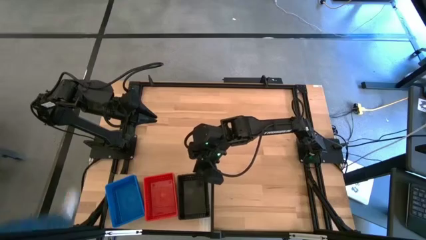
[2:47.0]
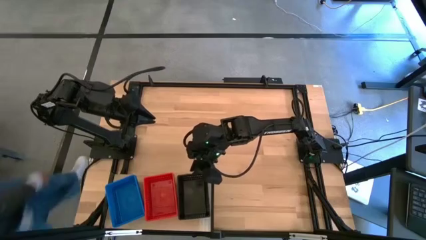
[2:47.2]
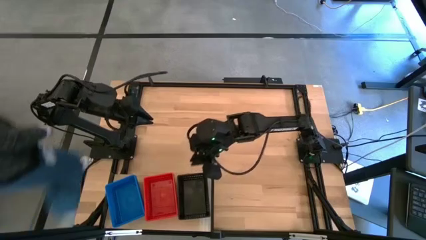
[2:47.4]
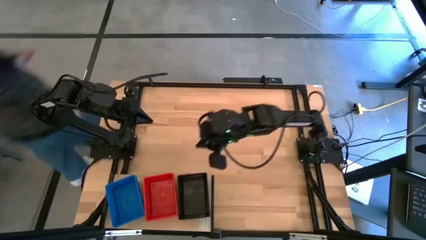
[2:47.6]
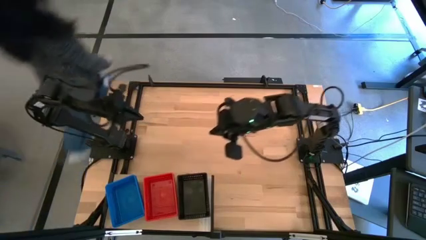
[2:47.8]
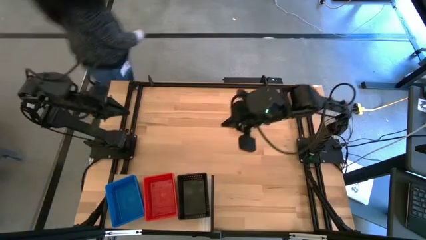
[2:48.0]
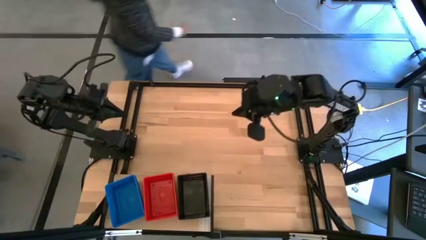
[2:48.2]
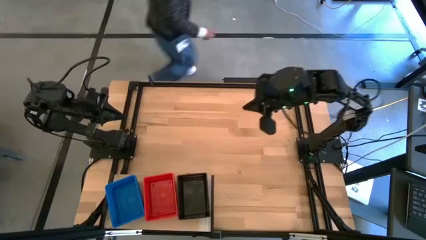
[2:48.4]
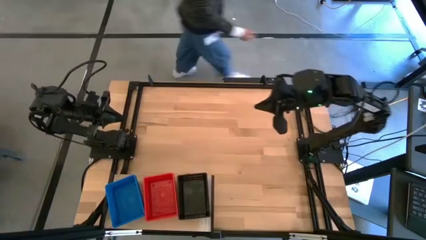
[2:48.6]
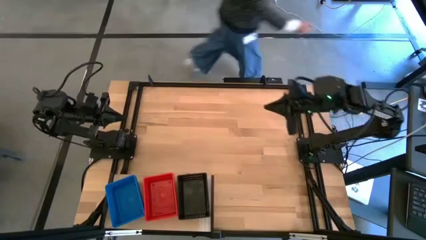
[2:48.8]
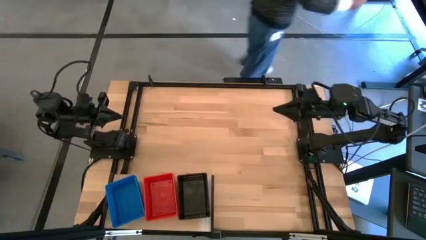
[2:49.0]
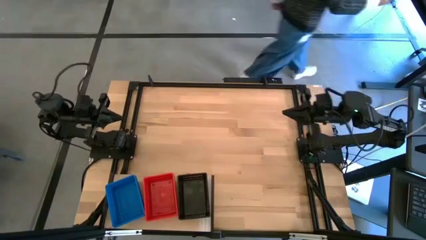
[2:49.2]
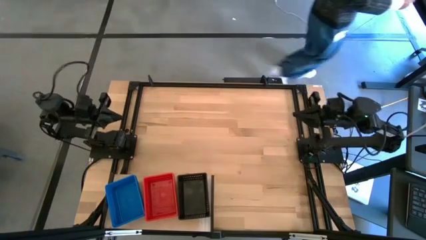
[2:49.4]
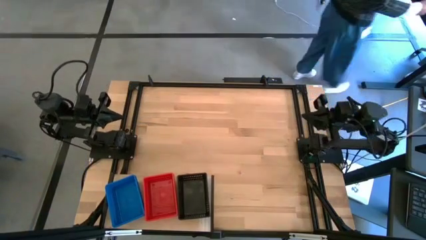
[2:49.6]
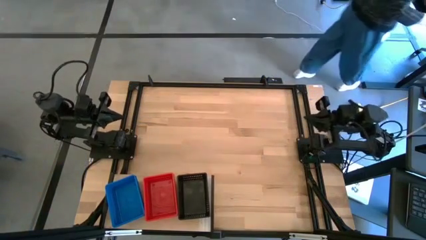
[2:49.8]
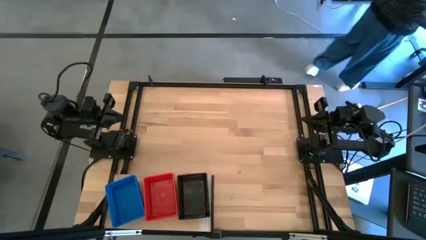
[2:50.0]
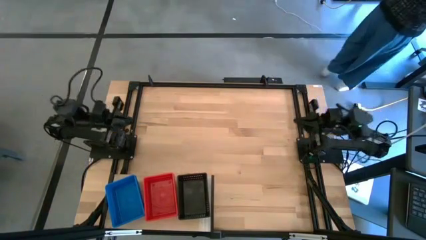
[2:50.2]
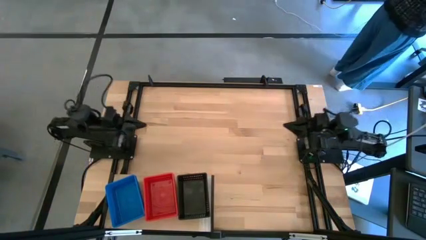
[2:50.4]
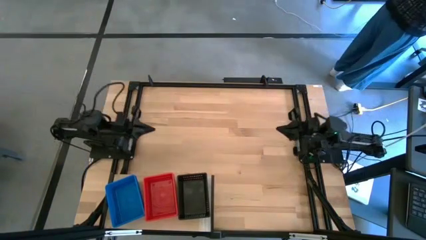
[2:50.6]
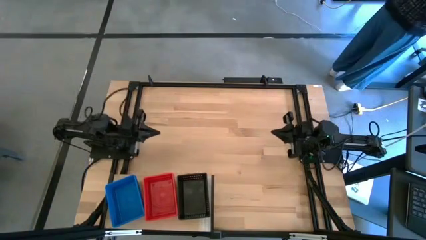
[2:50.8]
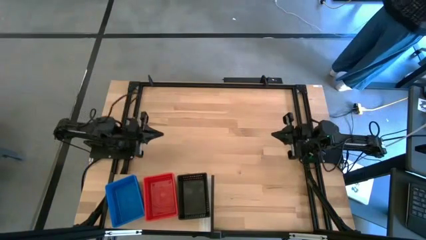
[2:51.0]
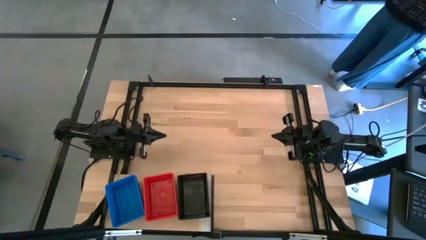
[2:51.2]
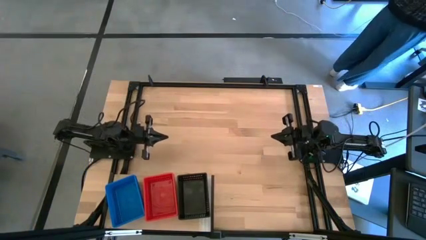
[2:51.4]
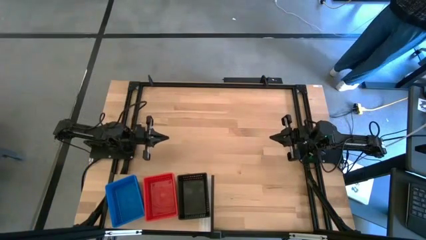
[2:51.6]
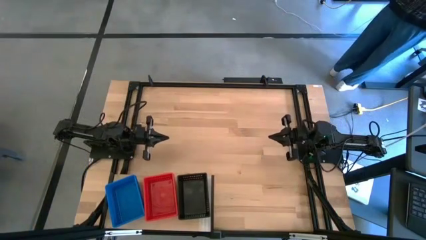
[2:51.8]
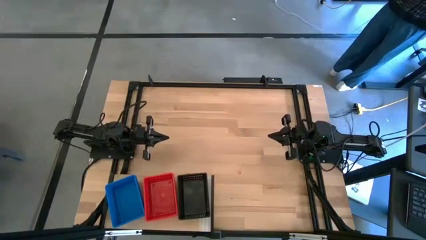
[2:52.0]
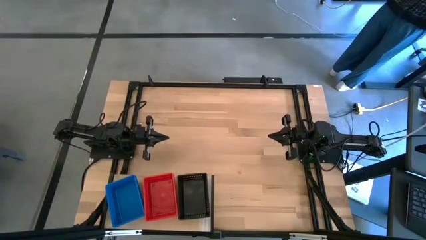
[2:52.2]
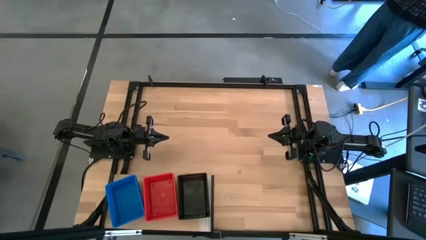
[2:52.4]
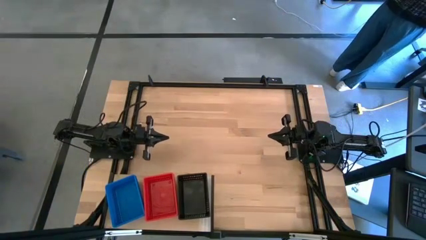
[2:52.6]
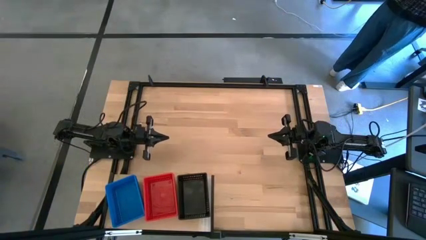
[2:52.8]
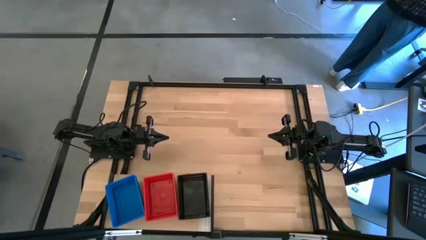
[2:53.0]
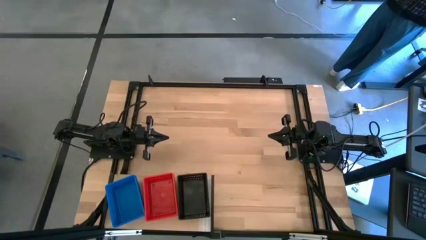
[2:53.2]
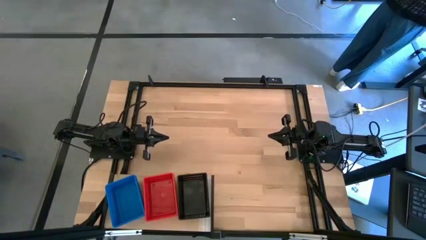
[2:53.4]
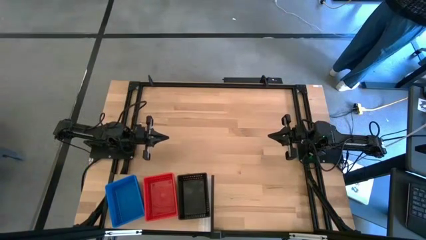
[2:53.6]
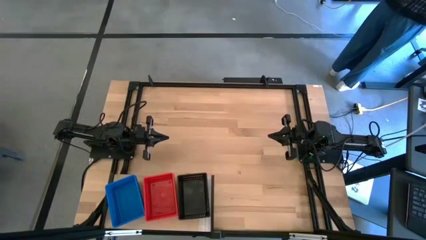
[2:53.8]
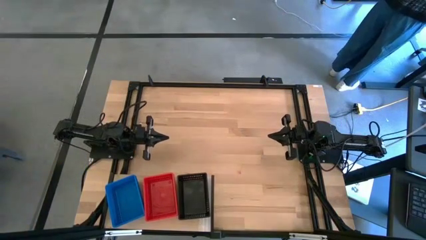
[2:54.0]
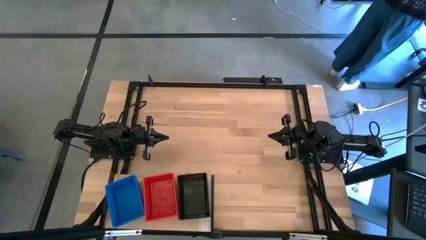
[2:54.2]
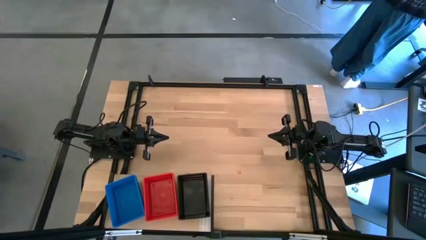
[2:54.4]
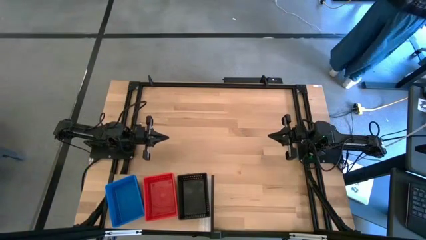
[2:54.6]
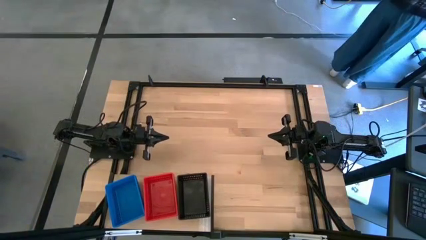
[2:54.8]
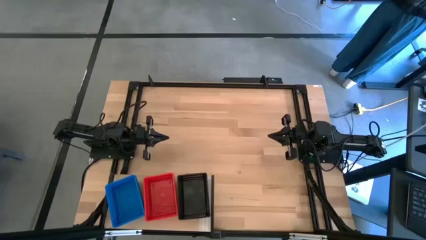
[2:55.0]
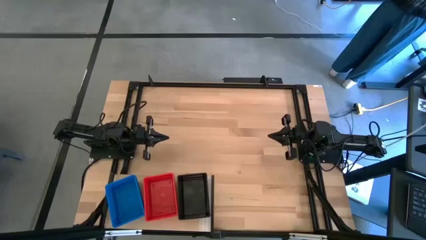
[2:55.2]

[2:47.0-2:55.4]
Task: Stack baskets on shelf by color
Return to Home Position

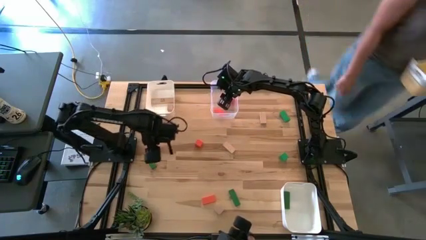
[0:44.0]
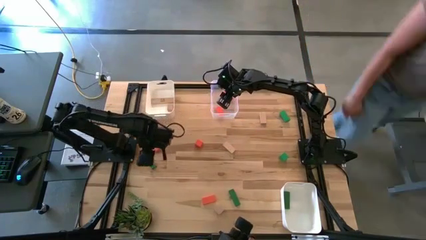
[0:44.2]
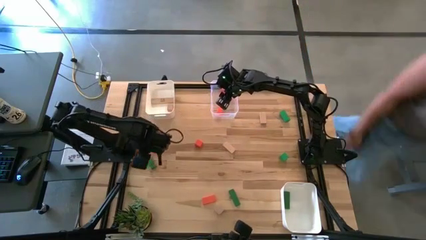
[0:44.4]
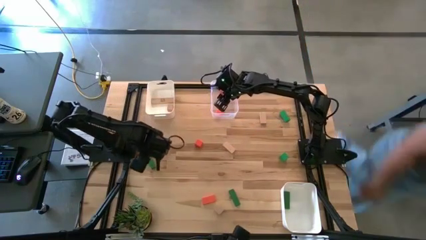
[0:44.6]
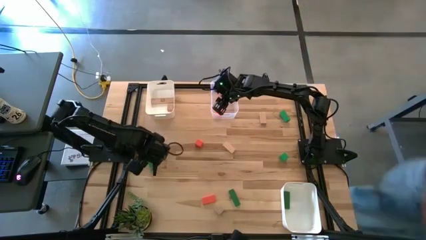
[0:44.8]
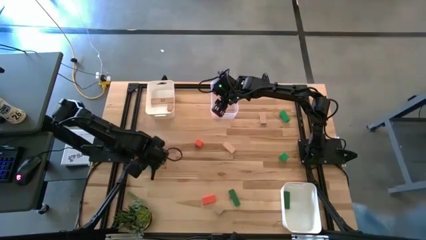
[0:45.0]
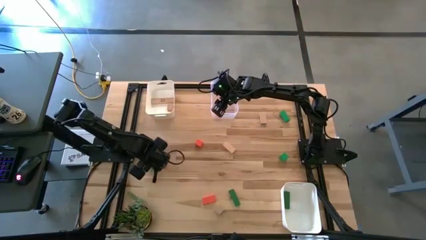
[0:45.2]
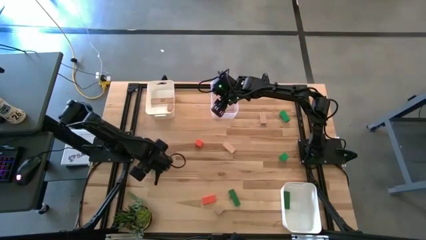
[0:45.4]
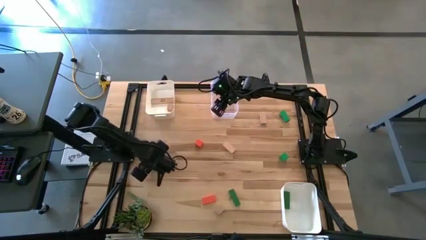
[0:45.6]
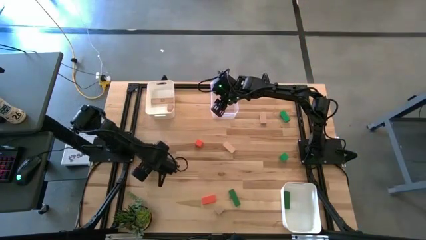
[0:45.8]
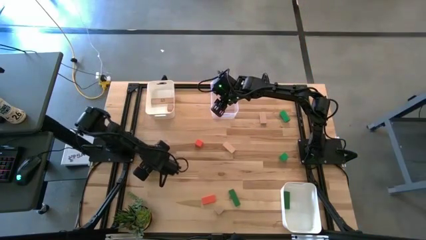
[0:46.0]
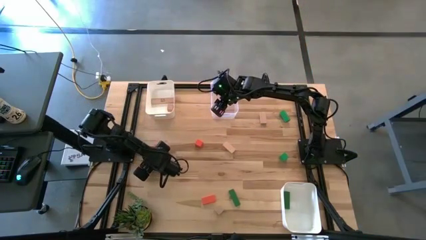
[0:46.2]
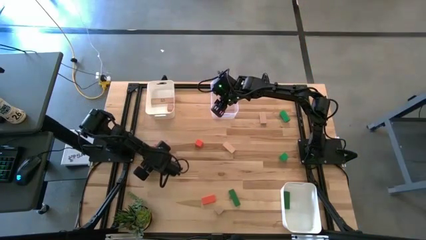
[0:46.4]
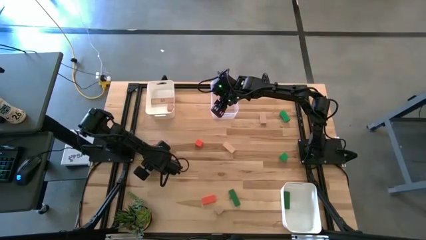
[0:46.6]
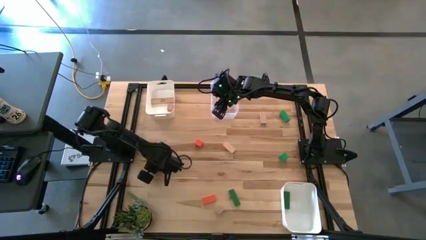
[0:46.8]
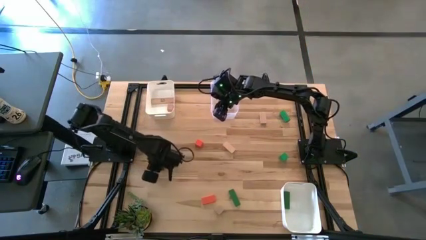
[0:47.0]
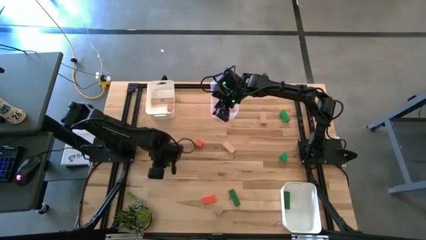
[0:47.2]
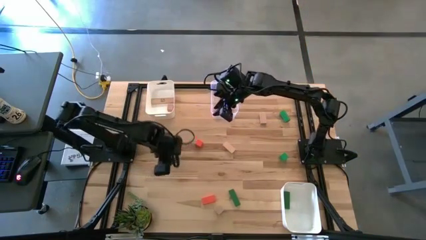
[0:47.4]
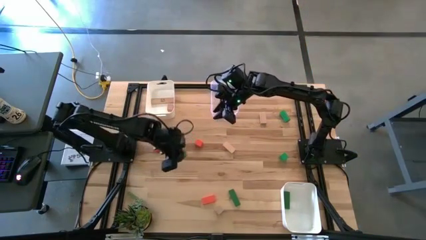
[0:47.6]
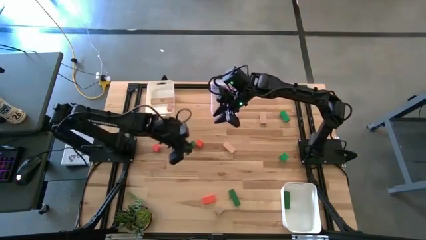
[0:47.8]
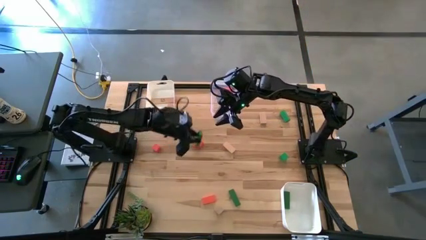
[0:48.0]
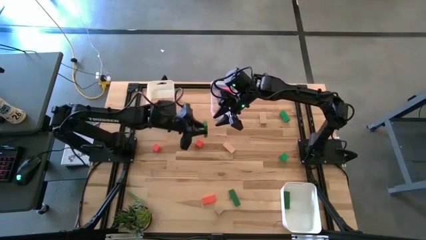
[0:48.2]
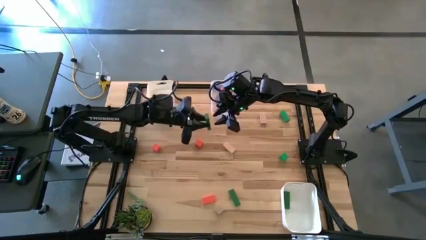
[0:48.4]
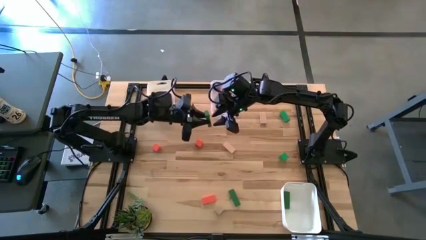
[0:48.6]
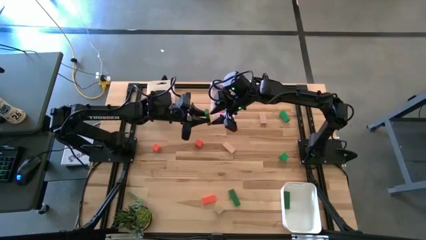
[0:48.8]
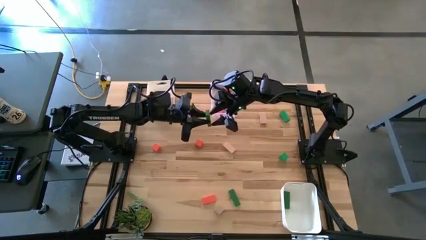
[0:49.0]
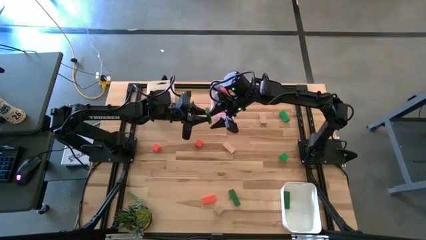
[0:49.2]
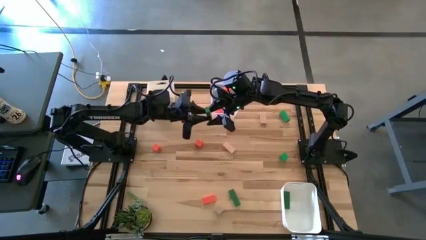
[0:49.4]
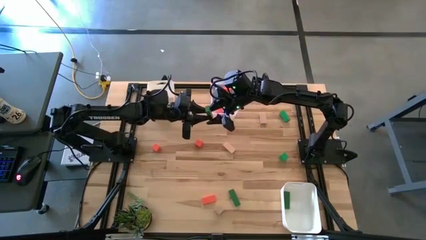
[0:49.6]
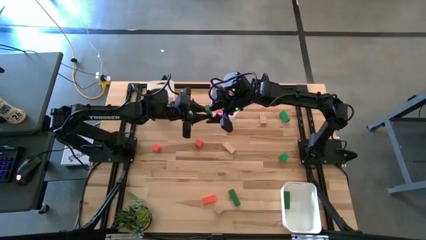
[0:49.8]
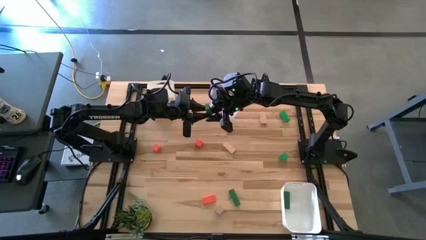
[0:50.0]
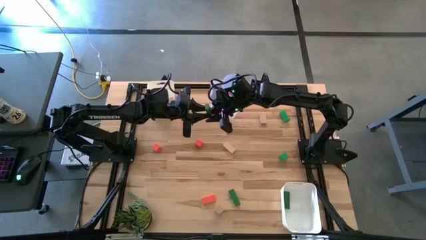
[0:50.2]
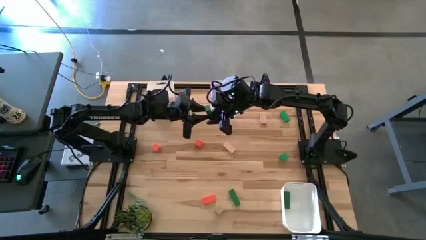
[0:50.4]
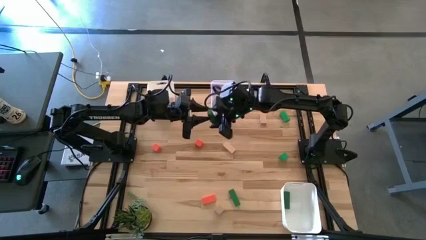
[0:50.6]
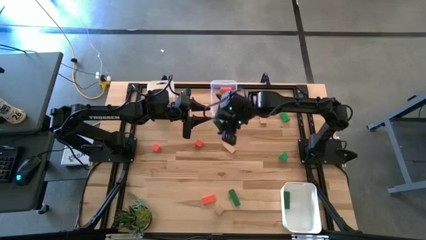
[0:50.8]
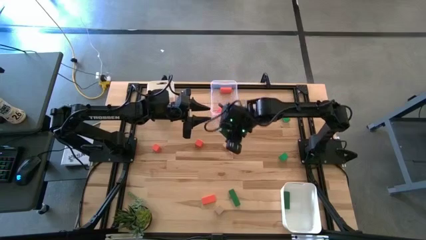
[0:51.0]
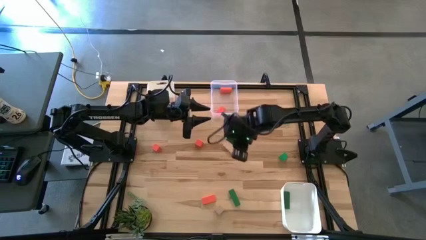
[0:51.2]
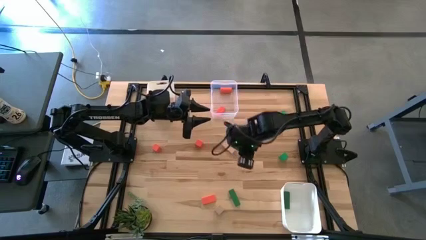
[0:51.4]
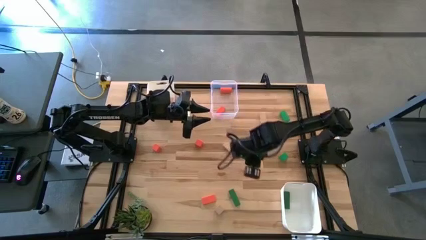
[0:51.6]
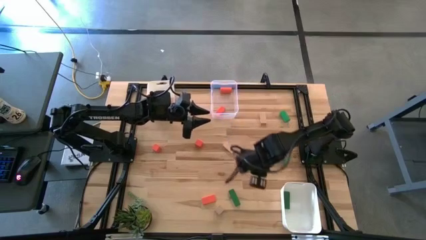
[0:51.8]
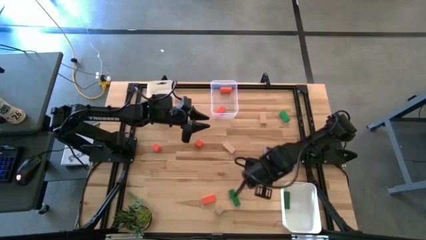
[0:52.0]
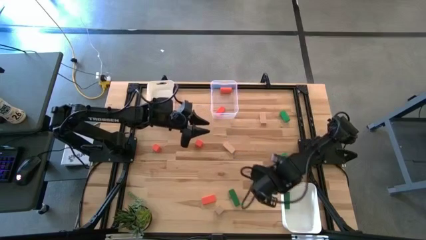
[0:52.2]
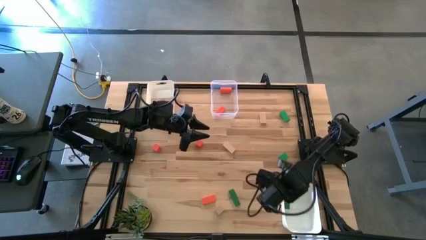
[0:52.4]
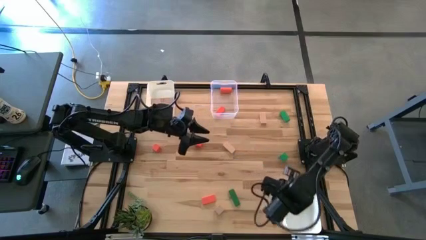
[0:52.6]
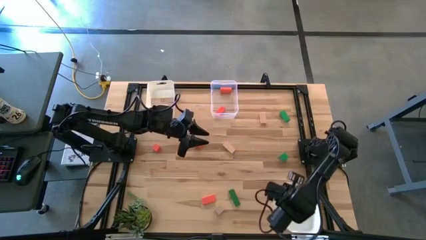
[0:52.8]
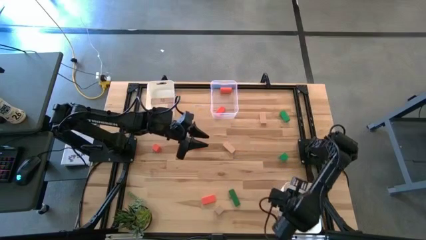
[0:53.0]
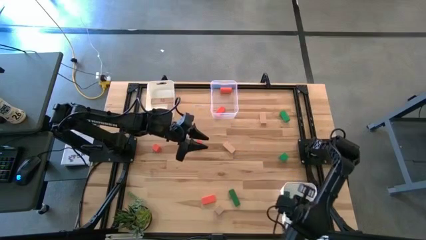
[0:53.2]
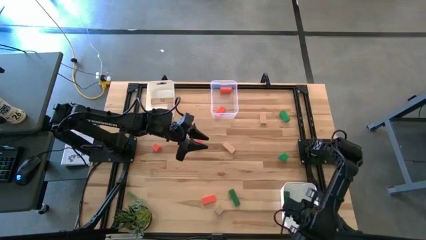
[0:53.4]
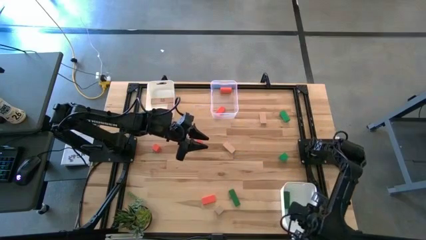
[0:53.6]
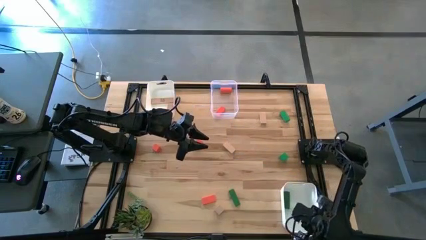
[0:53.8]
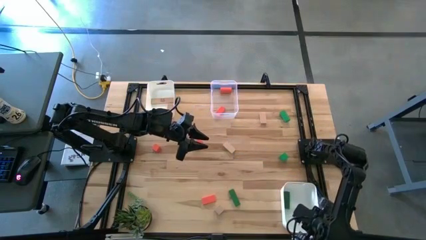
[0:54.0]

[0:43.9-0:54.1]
Task: Sort & place blocks by color
Put the green block into the bottom white bin
